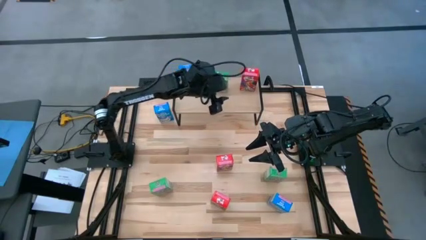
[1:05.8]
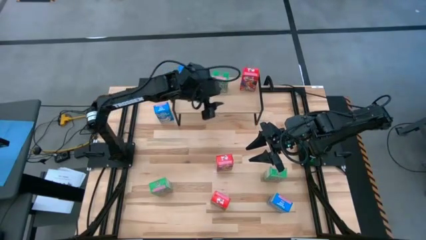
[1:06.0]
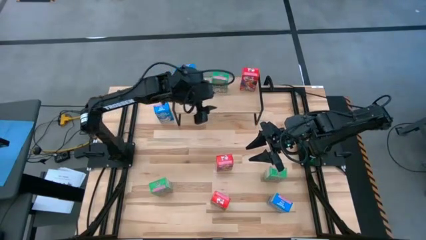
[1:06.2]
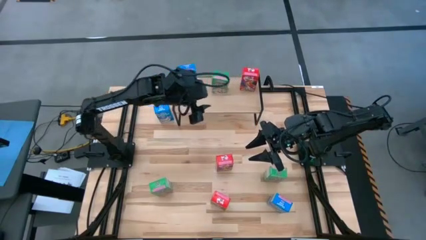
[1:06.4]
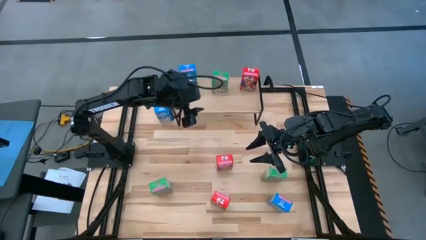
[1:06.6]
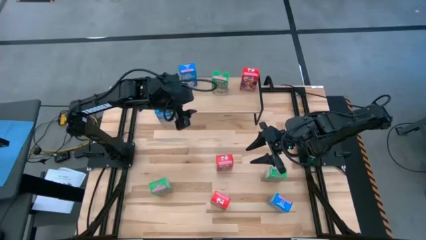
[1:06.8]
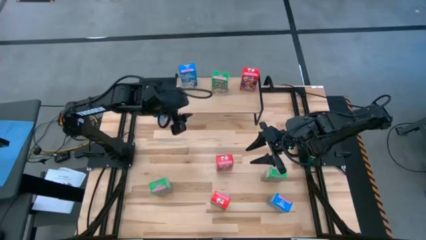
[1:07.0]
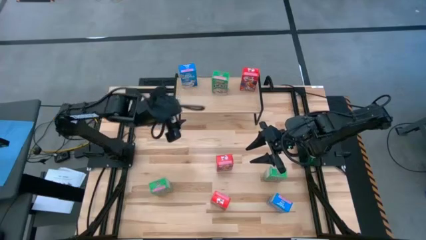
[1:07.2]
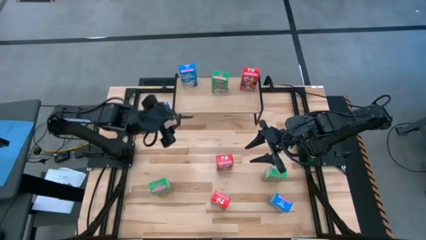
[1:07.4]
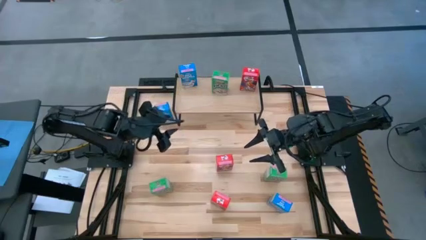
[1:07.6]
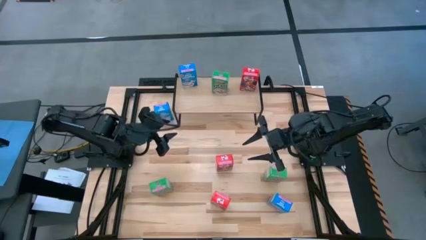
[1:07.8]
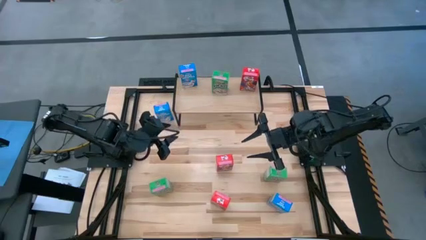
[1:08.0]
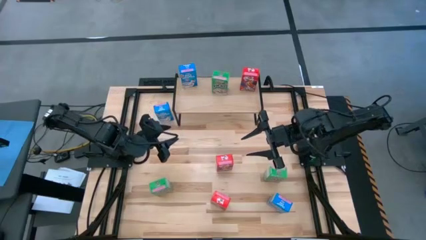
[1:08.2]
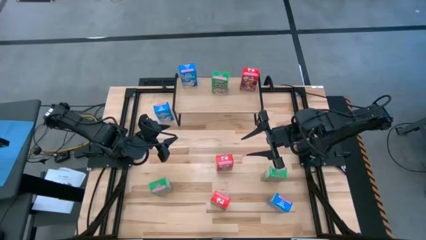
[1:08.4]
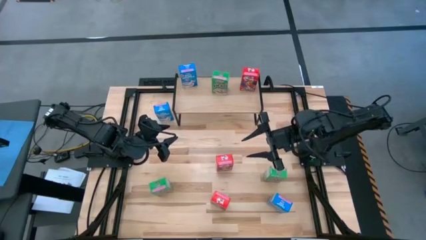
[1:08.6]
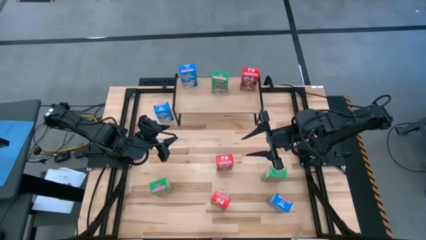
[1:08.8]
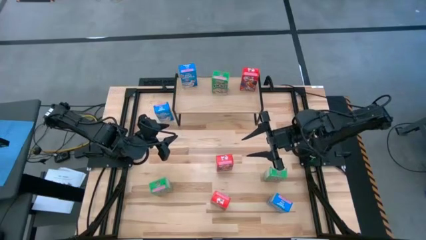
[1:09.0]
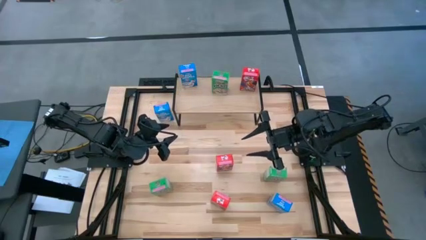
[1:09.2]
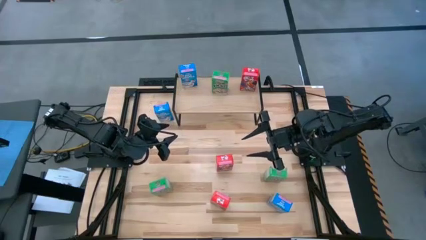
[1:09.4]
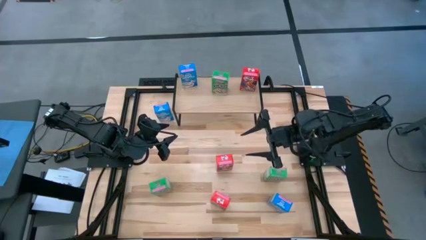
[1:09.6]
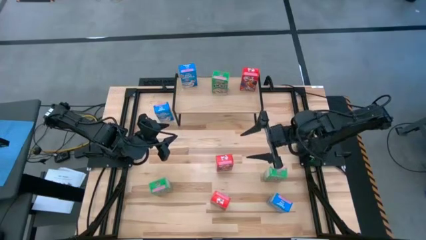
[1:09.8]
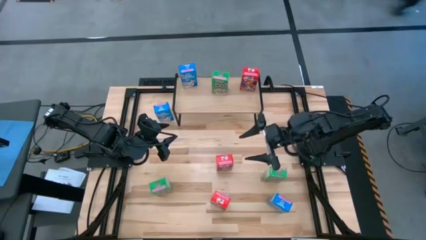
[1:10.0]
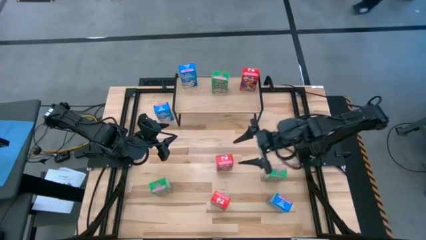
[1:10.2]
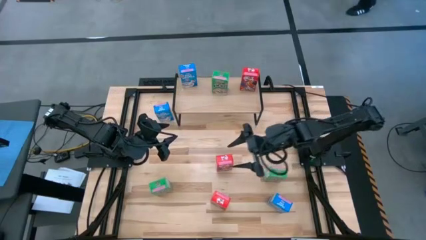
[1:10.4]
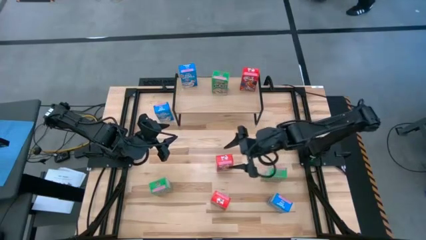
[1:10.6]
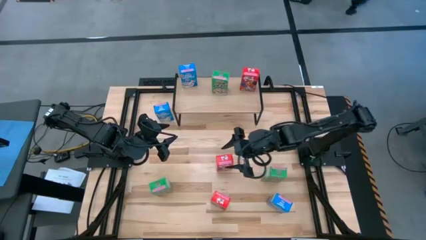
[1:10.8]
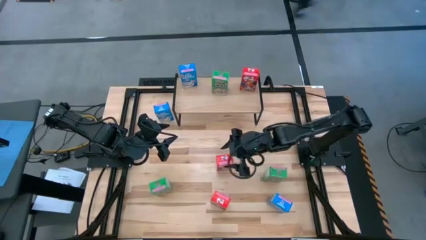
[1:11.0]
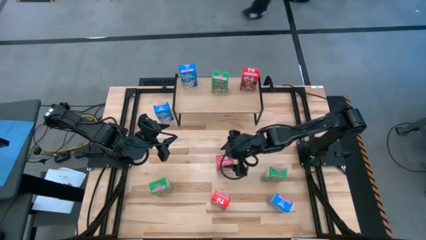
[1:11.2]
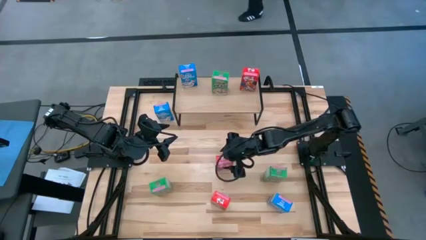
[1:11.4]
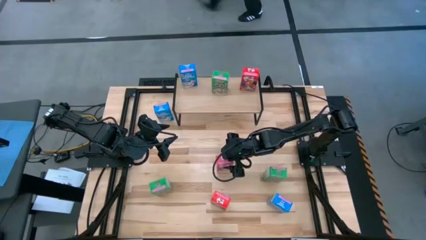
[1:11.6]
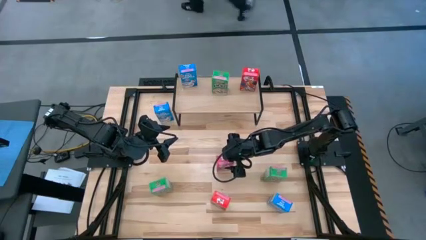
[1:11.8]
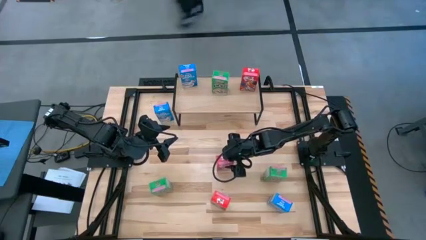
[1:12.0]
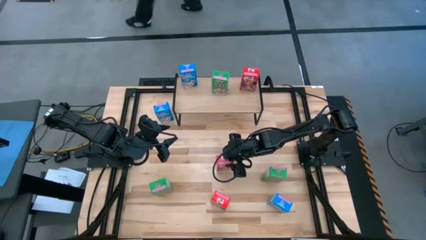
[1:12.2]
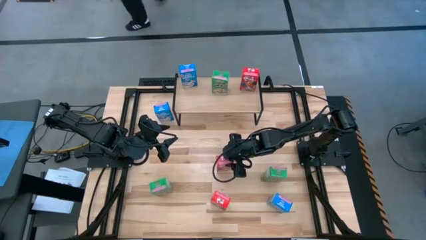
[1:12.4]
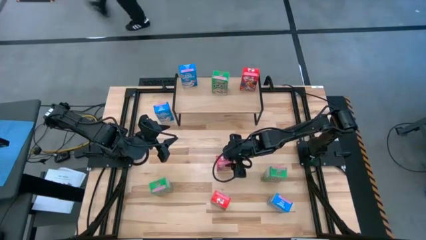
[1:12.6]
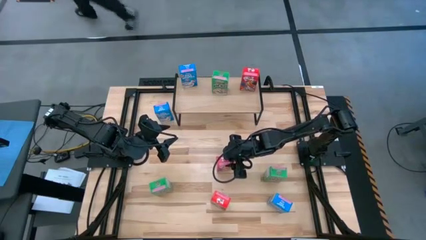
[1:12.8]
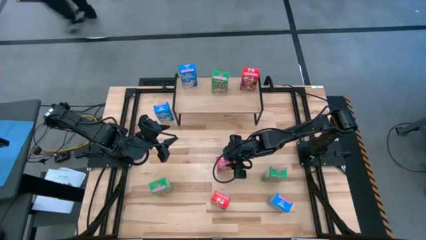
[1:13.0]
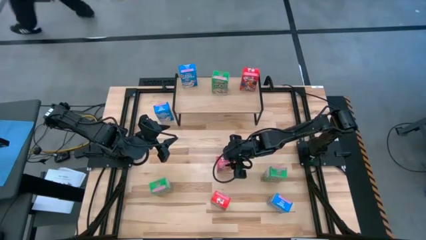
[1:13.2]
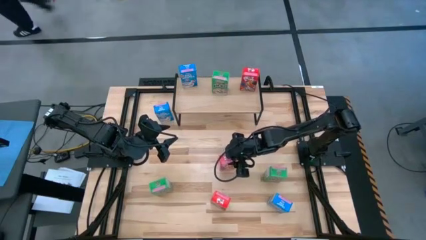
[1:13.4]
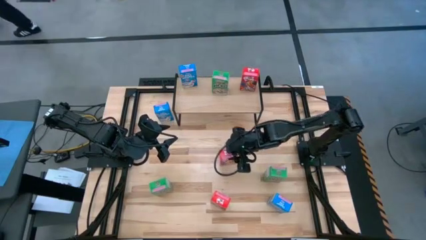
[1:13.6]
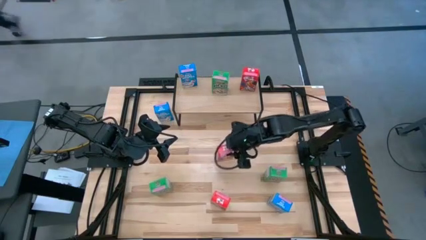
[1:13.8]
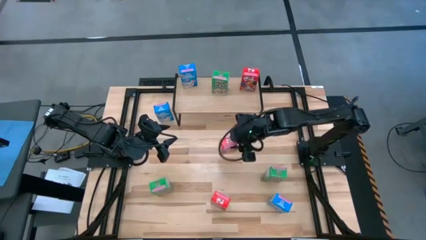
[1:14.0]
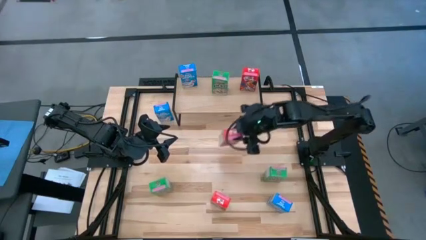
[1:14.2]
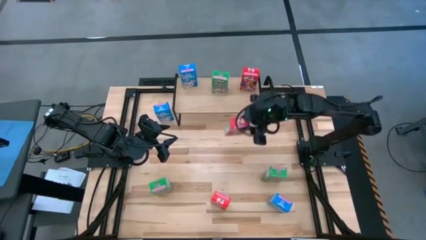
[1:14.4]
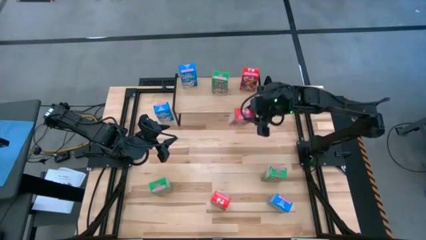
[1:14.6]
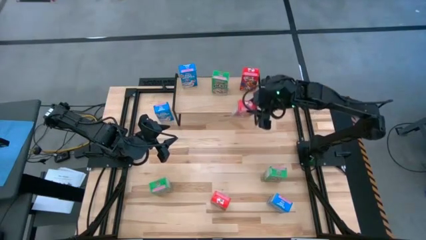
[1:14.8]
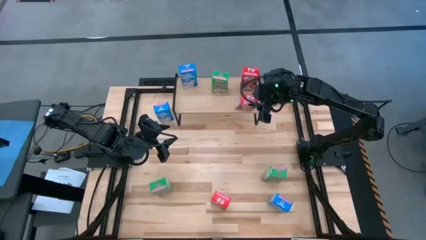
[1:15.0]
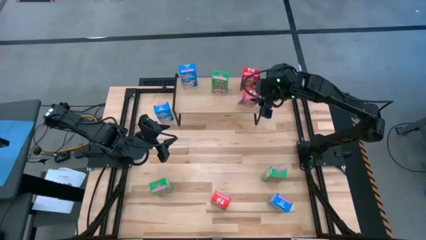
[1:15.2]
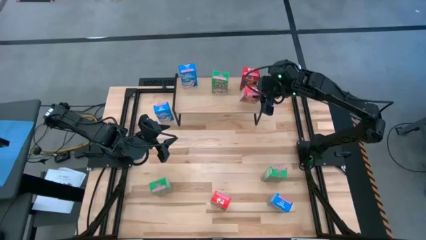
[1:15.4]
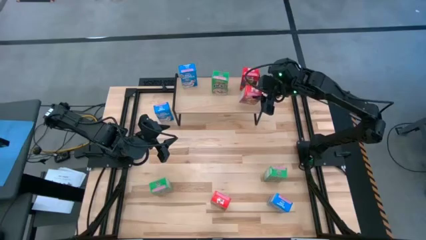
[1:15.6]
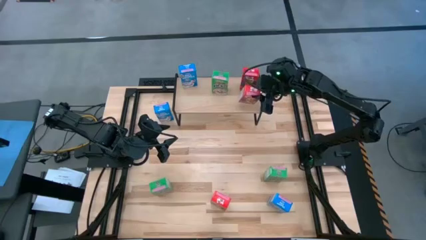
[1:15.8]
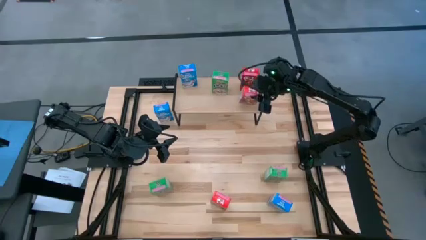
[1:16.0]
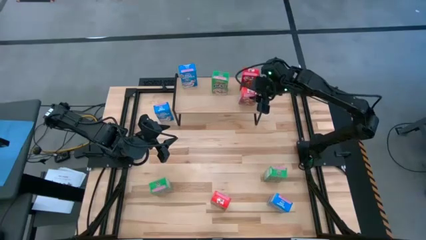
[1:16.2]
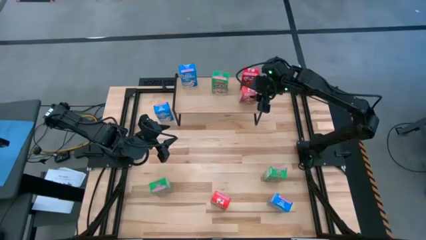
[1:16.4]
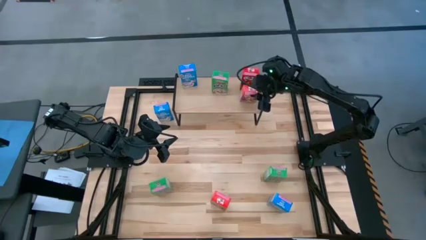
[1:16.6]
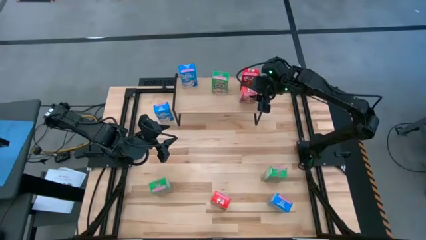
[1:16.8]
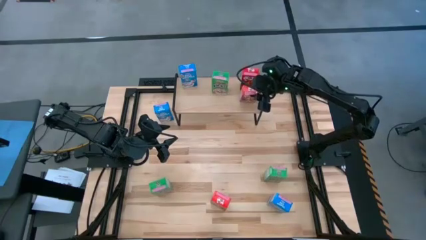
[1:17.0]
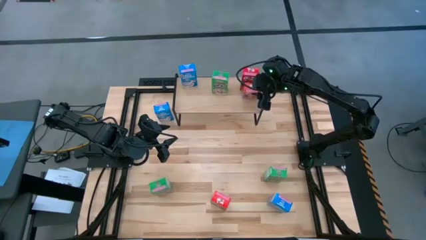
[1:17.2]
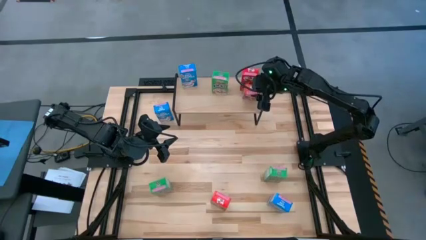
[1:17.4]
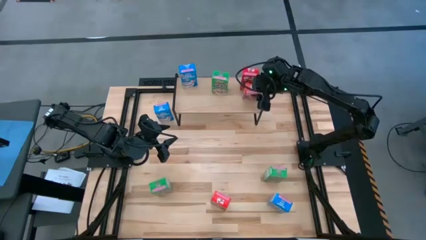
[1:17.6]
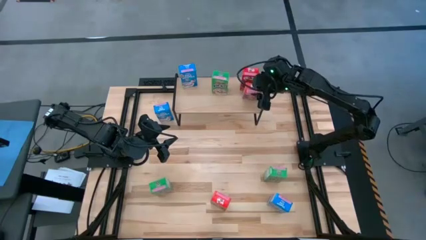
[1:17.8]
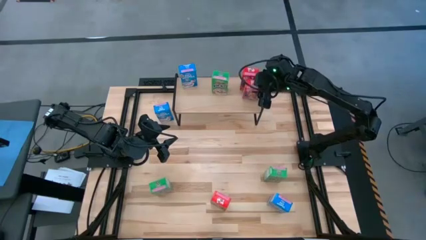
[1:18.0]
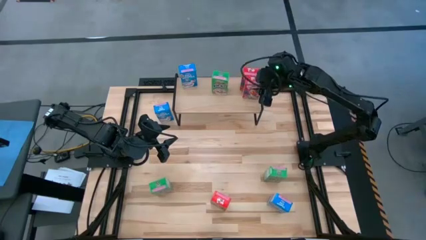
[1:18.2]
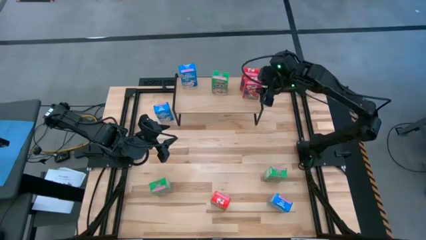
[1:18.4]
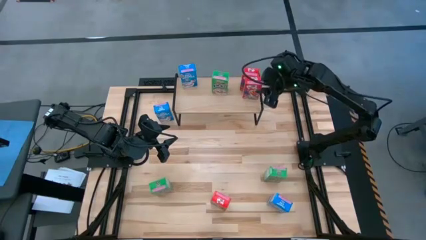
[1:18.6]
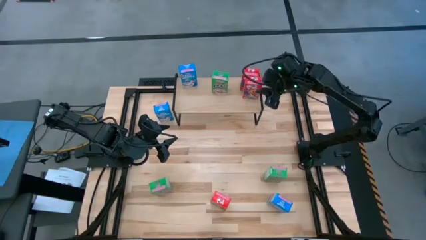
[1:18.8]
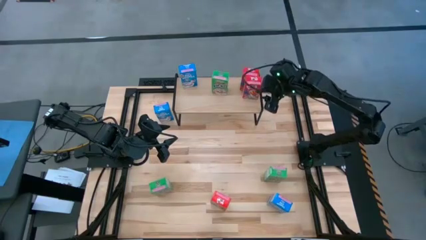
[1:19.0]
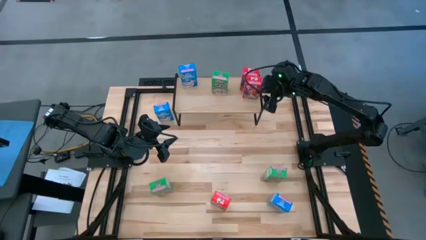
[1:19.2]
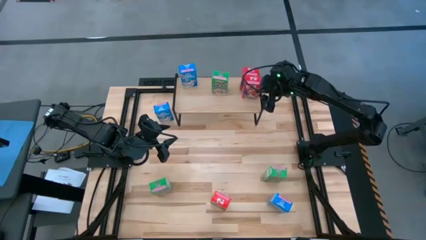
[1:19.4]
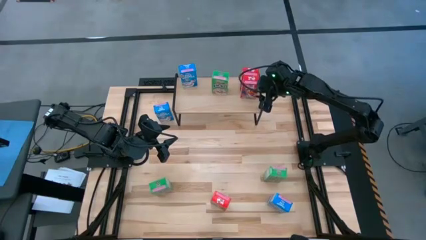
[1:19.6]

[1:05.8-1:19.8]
Task: Stack cereal on shelf
Put the top red cereal box on the shelf aligned with the other red cereal box
